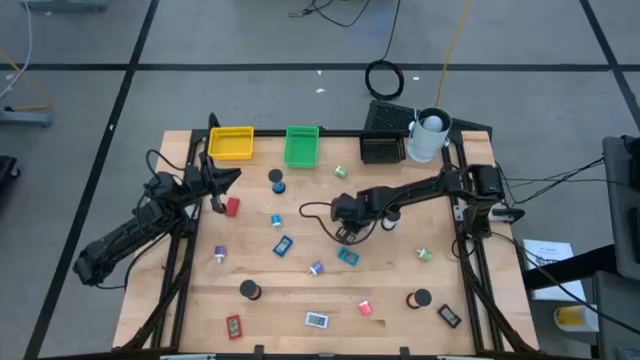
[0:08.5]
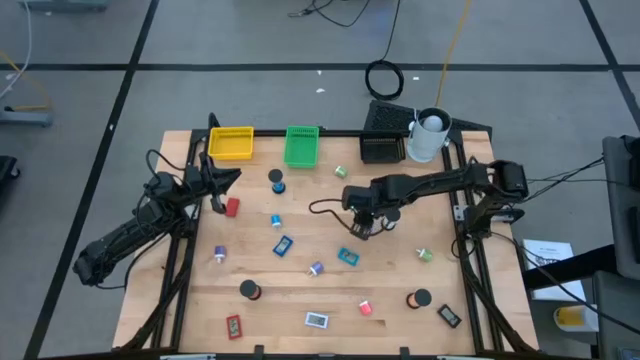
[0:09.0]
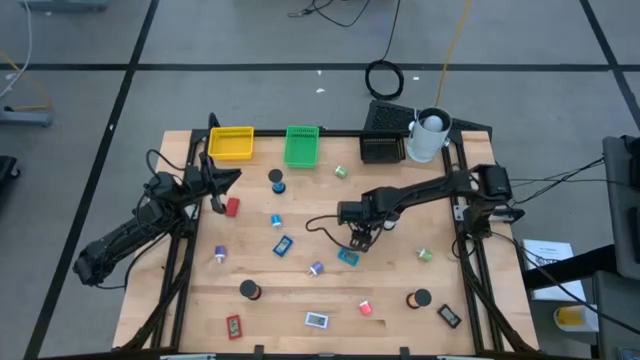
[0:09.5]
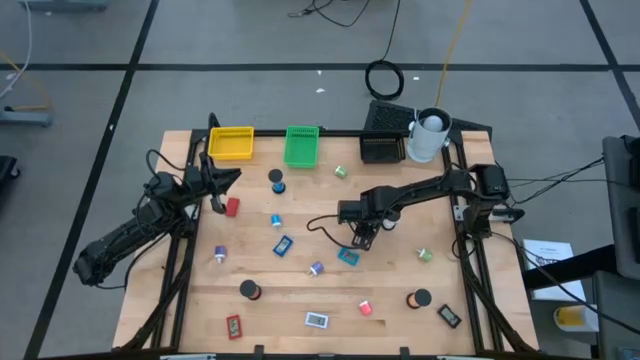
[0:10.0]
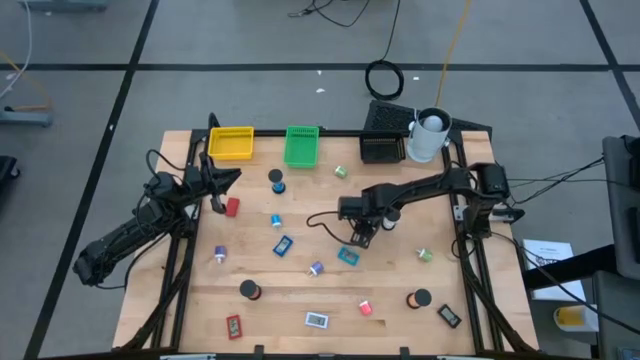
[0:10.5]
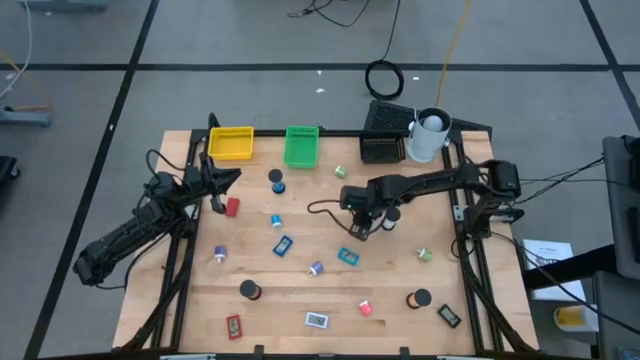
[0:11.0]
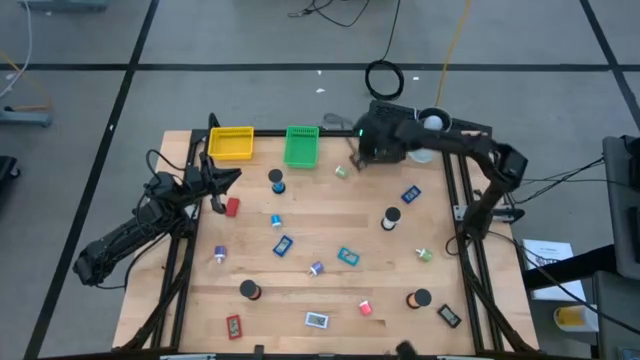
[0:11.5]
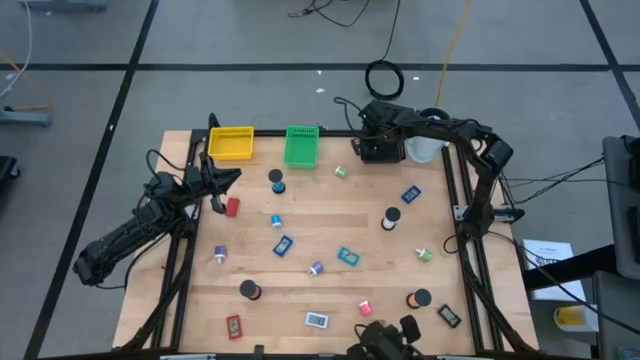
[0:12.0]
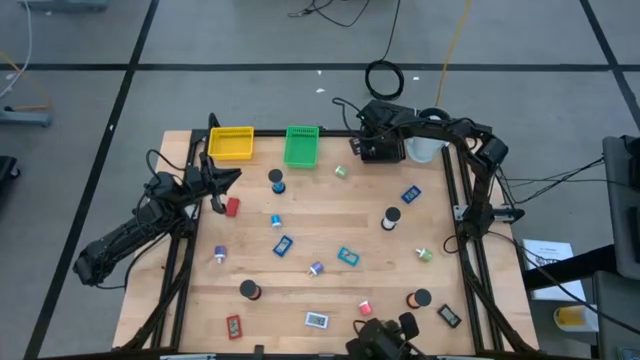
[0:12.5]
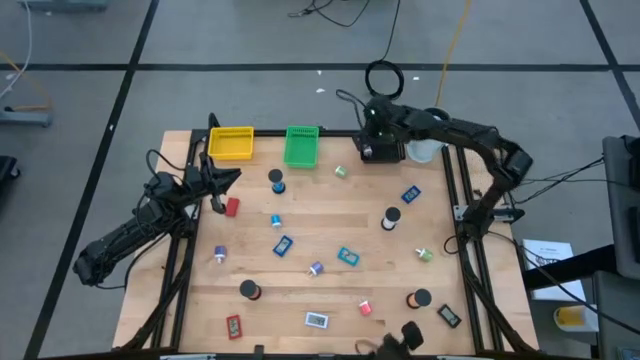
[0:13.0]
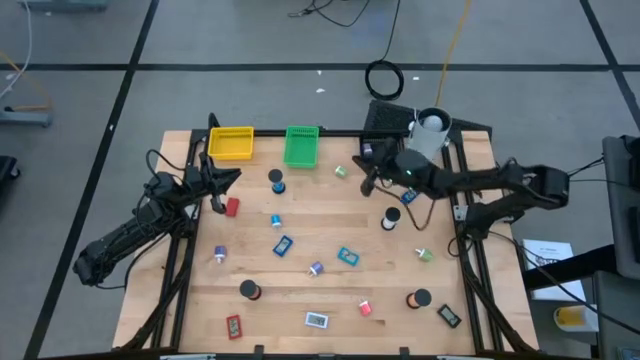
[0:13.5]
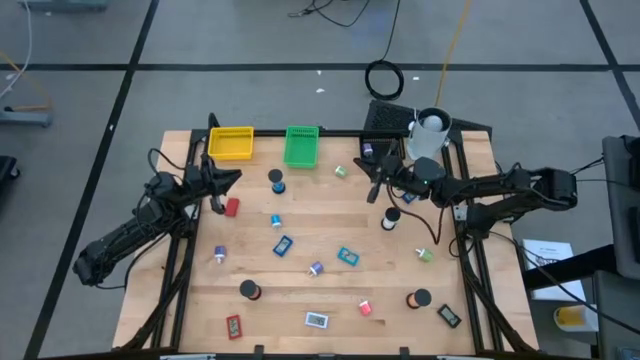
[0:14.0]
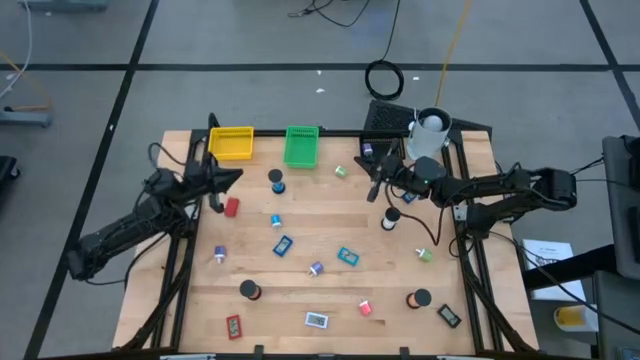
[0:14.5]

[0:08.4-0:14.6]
Task: Pick & Place Office items
Put the right blue charger adapter into the black bin

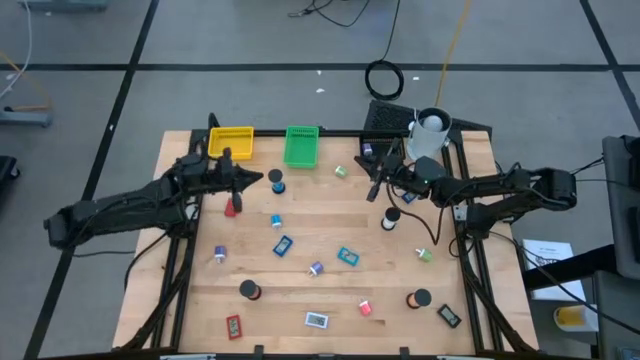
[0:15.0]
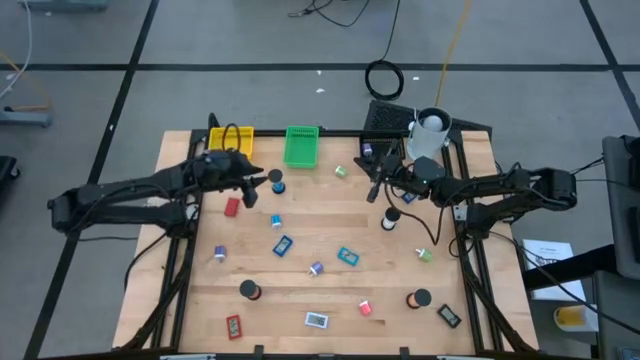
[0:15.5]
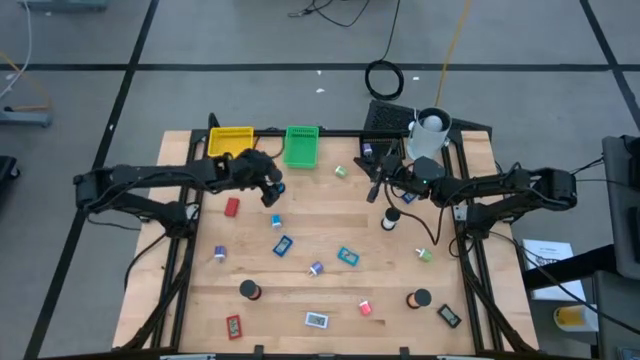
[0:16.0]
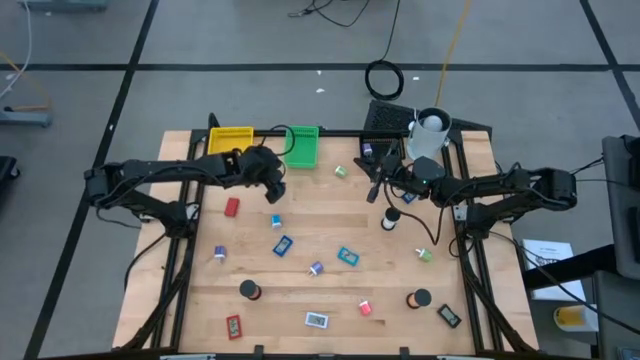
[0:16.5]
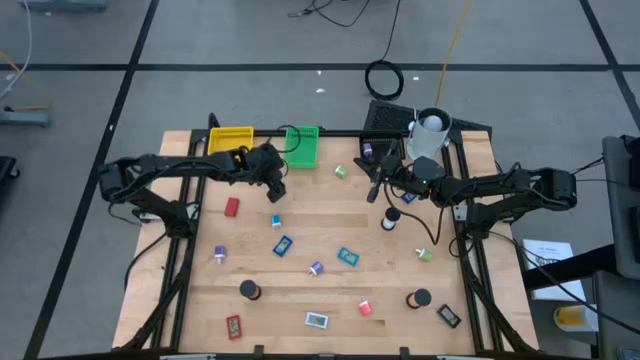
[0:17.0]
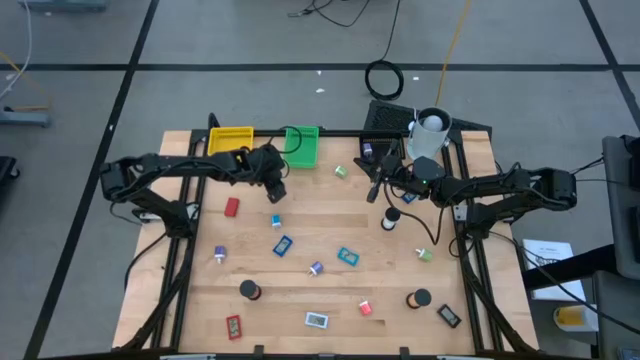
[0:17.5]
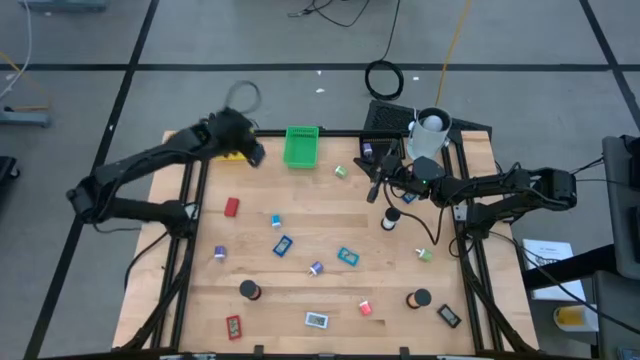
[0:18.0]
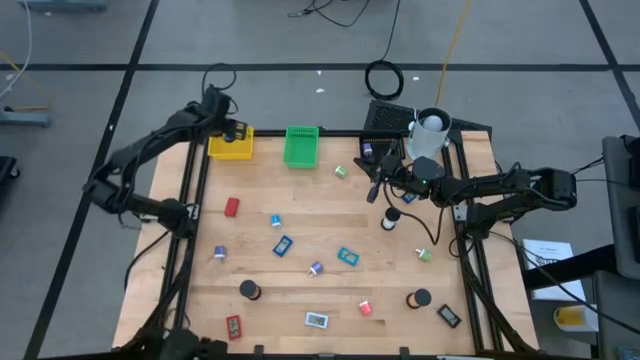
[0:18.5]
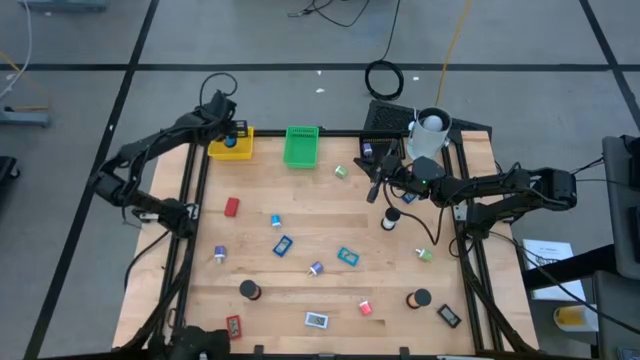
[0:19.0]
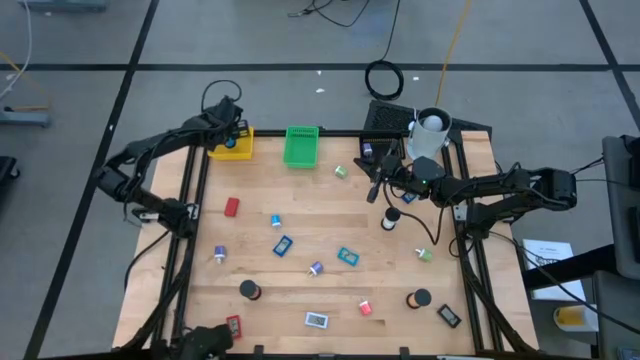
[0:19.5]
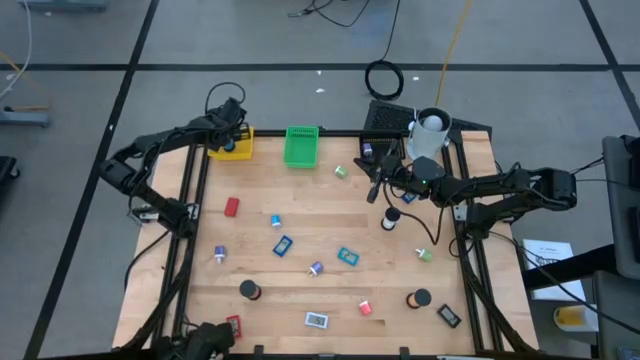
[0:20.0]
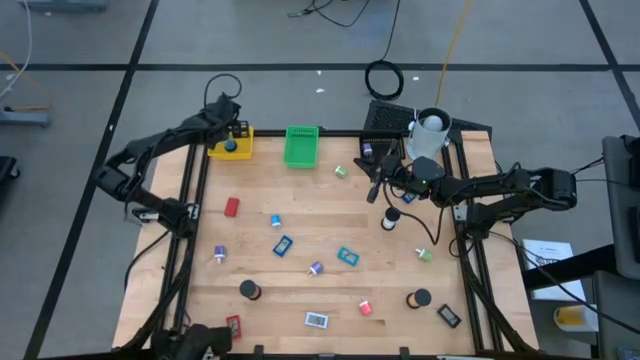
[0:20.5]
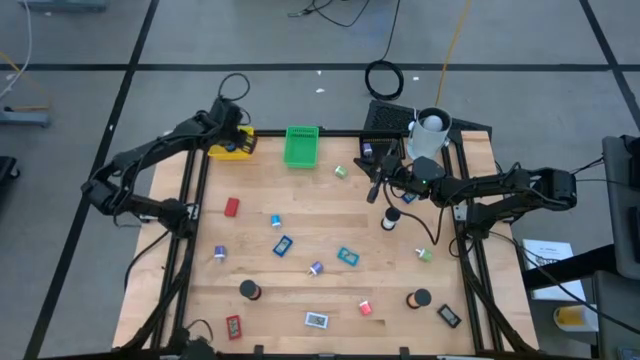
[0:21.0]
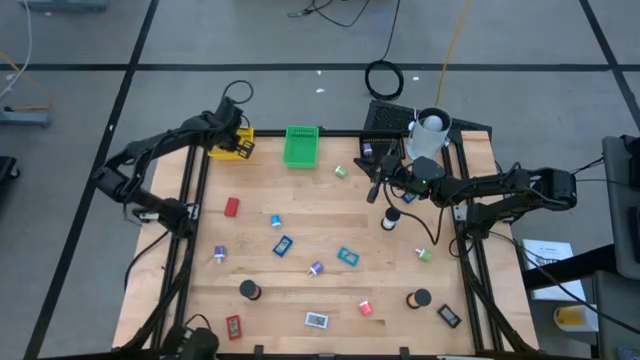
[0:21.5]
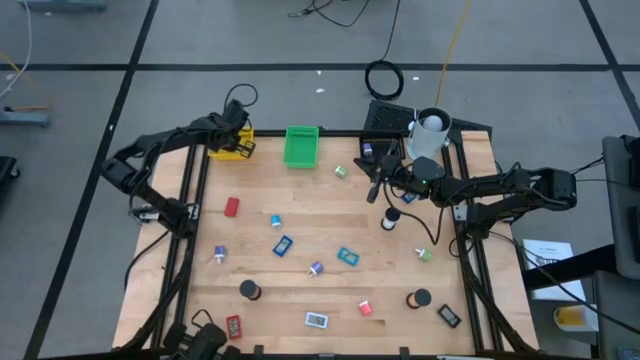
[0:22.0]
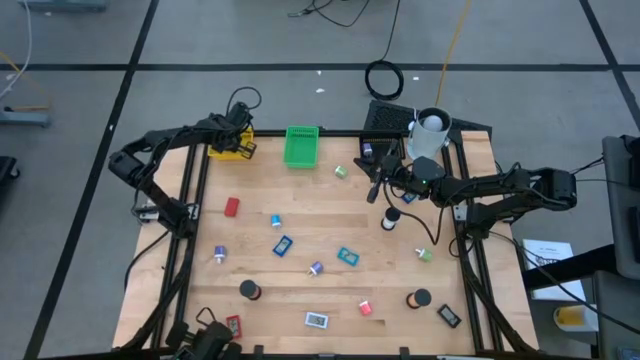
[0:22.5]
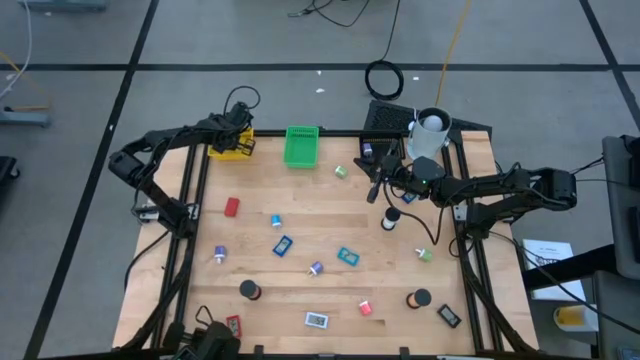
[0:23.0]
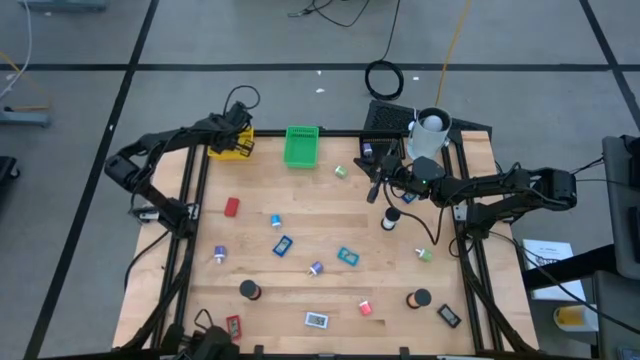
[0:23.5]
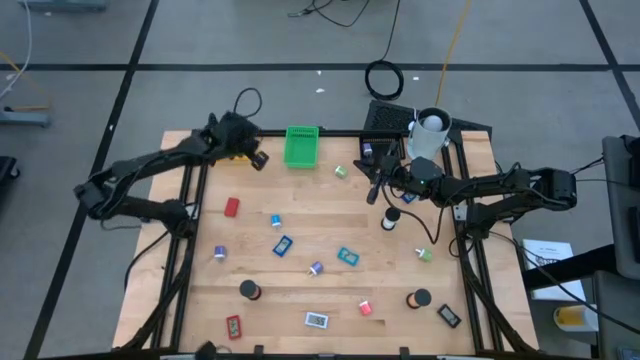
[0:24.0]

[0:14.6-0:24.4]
Put the blue sand timer into the yellow bin

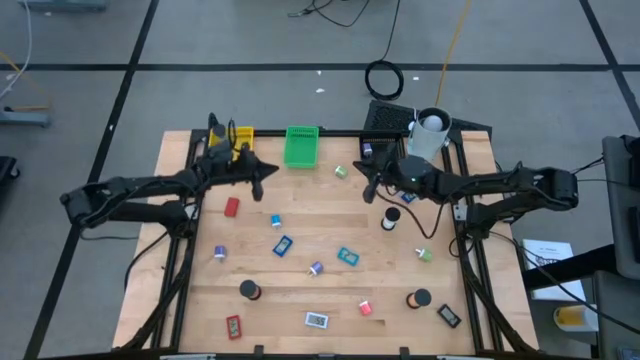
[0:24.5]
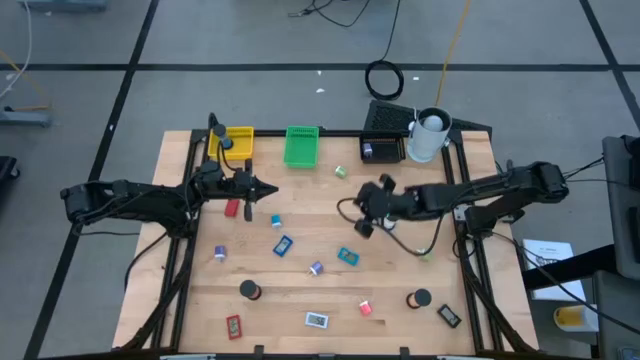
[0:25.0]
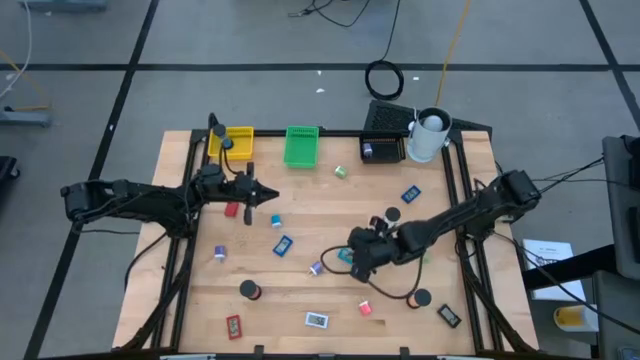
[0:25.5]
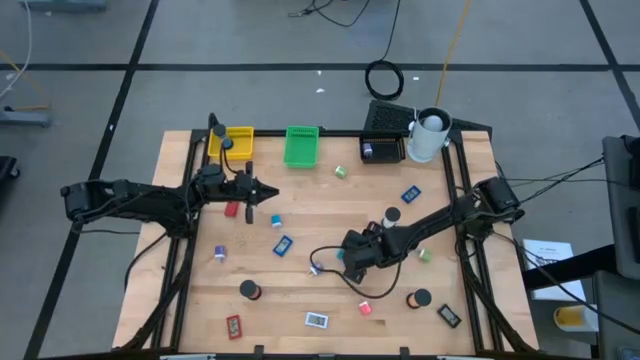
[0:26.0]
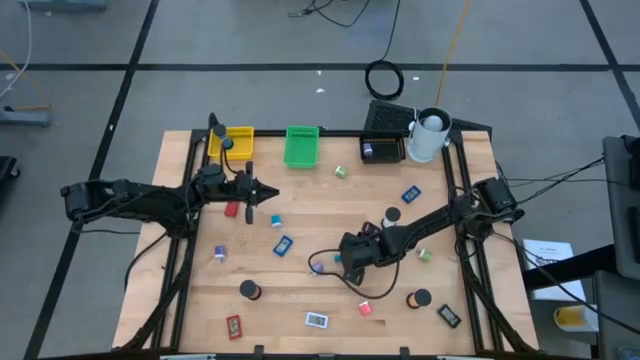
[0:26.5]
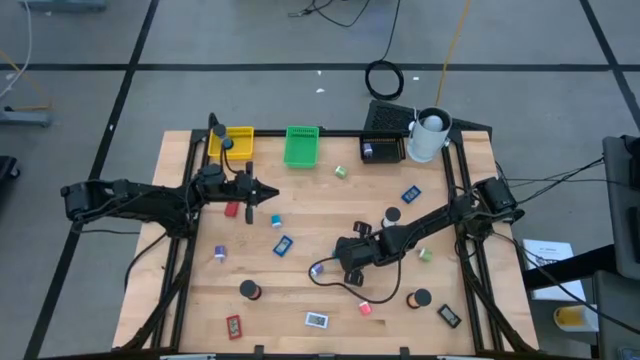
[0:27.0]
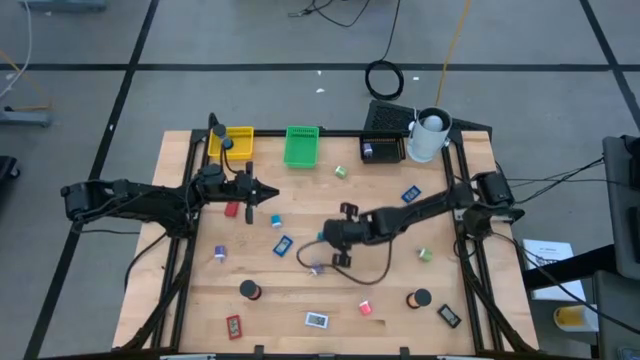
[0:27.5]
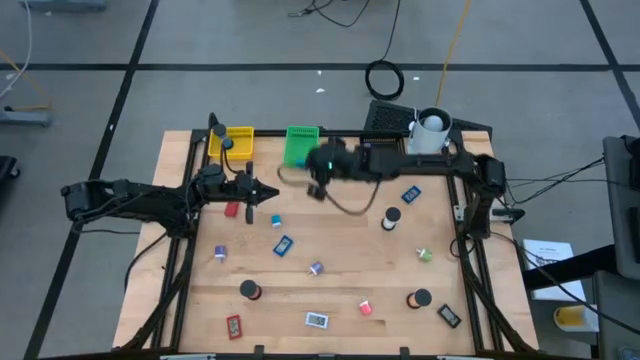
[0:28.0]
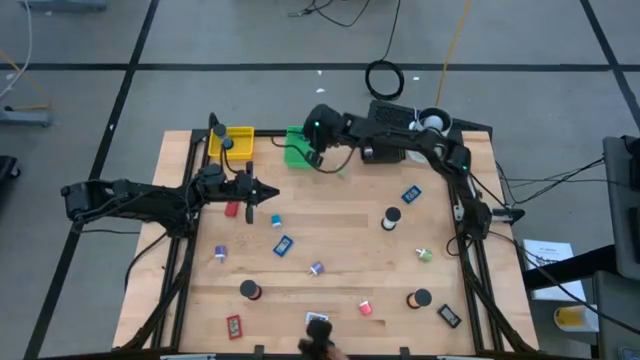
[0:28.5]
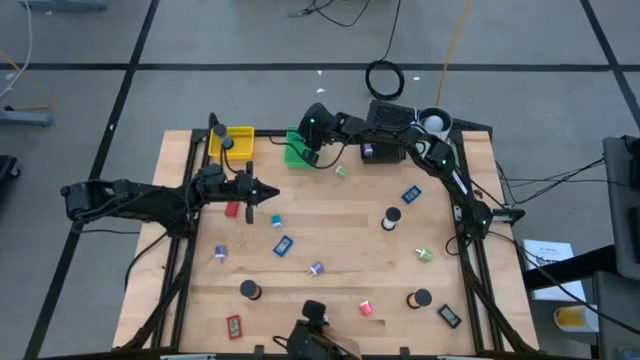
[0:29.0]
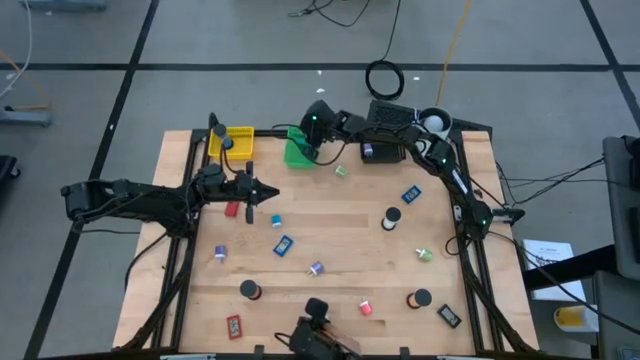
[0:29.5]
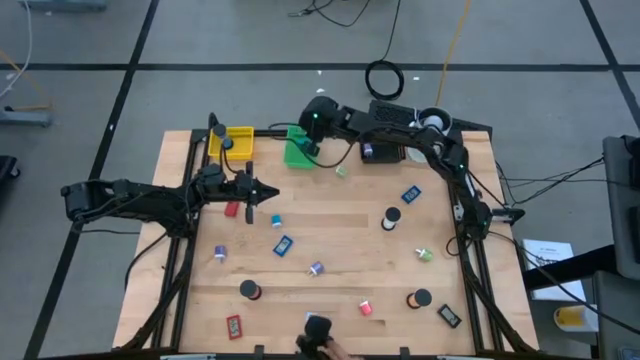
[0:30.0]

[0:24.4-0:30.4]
Put the light blue digital timer into the green bin
